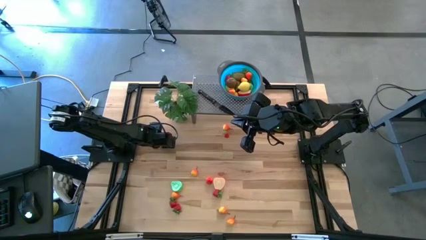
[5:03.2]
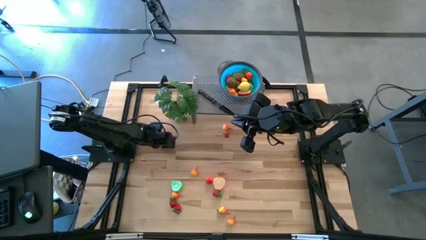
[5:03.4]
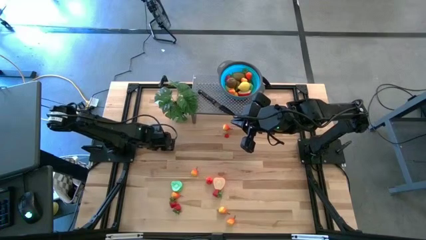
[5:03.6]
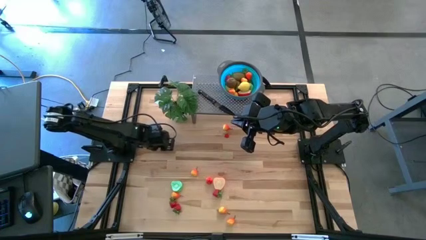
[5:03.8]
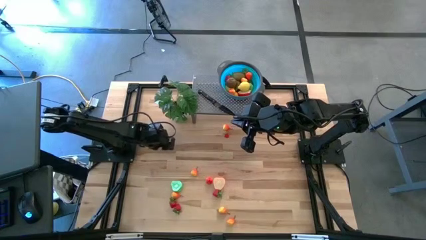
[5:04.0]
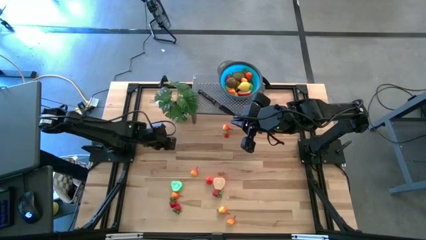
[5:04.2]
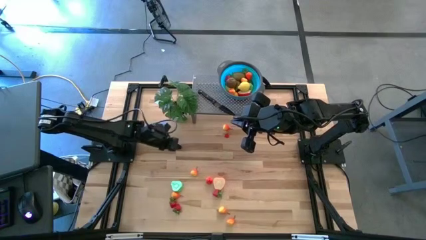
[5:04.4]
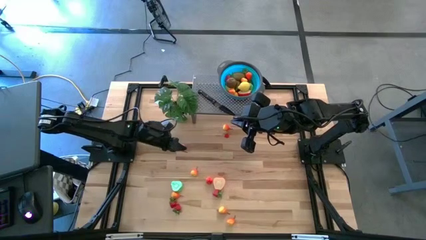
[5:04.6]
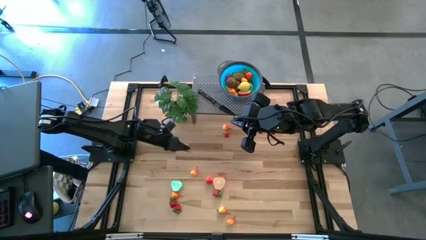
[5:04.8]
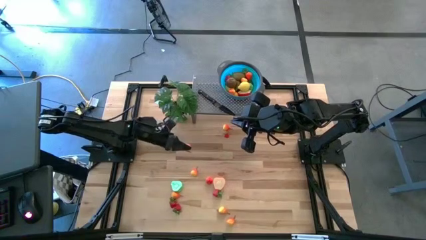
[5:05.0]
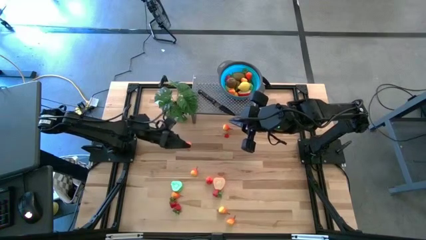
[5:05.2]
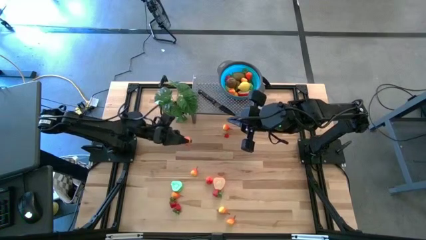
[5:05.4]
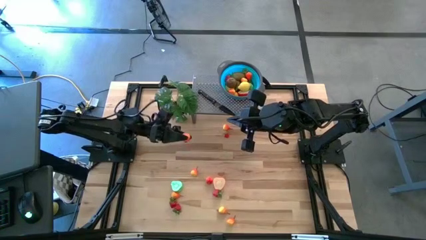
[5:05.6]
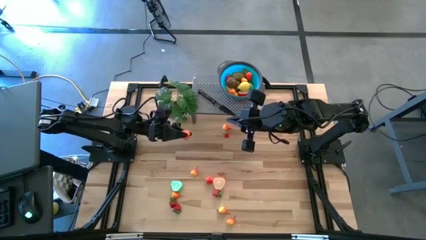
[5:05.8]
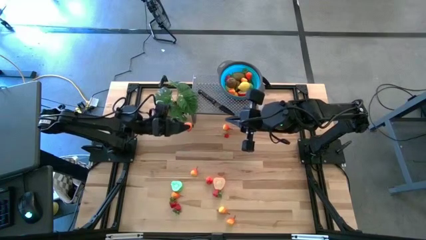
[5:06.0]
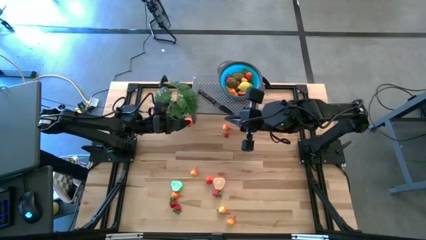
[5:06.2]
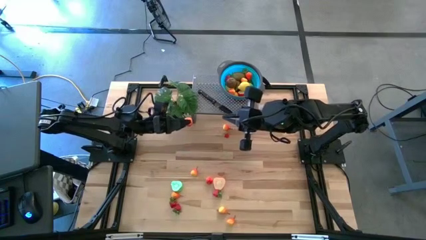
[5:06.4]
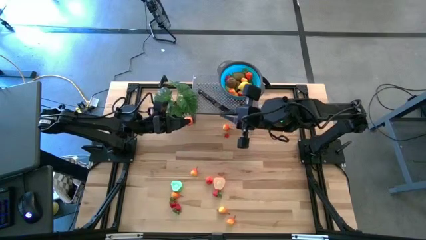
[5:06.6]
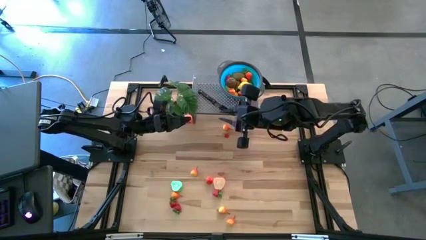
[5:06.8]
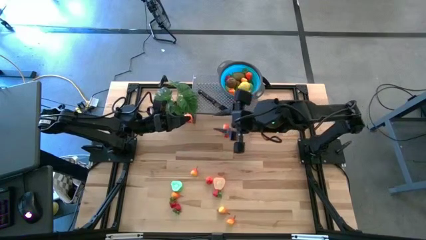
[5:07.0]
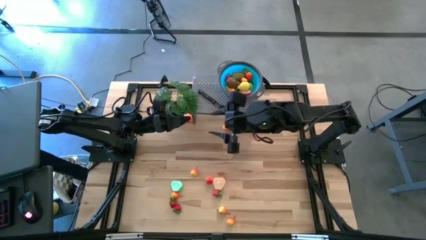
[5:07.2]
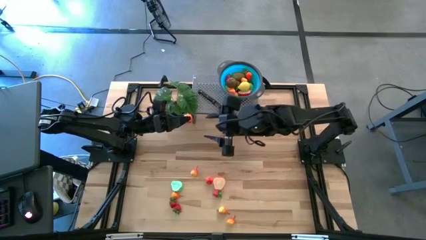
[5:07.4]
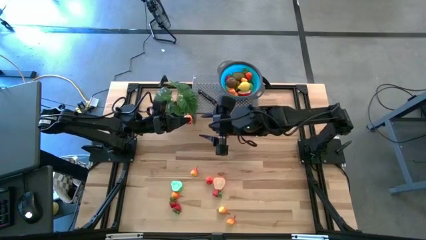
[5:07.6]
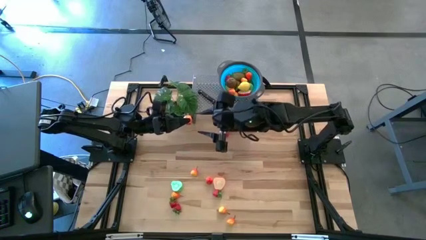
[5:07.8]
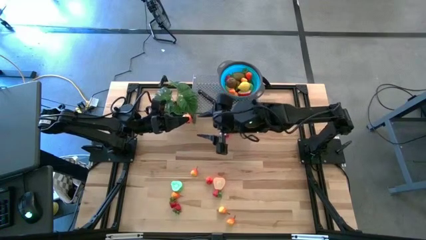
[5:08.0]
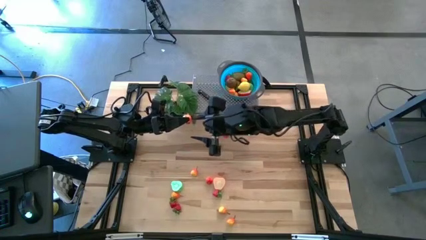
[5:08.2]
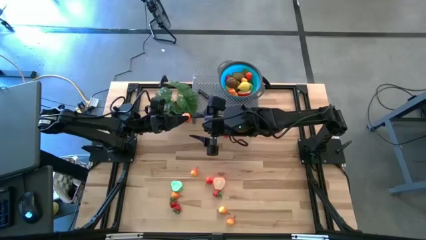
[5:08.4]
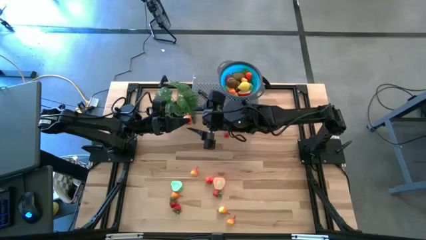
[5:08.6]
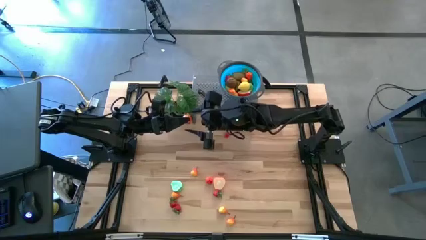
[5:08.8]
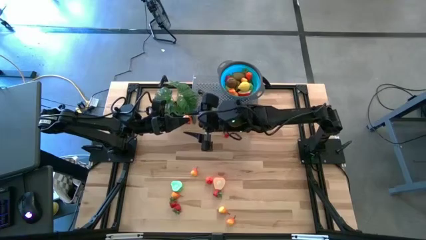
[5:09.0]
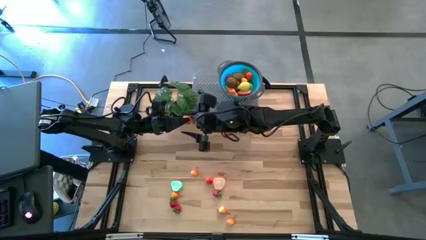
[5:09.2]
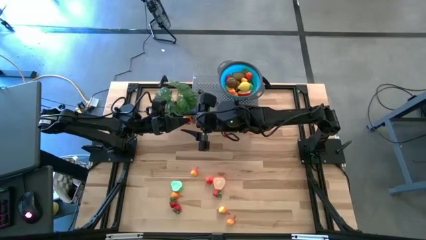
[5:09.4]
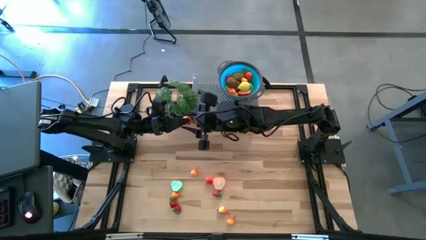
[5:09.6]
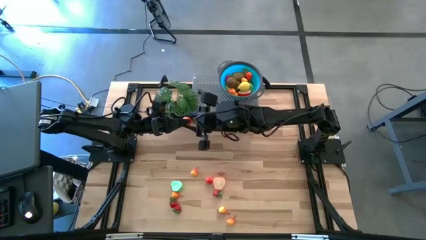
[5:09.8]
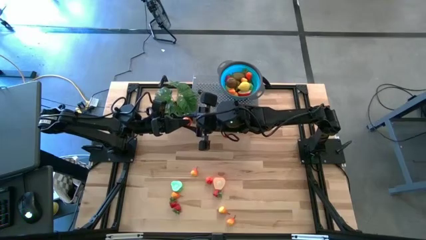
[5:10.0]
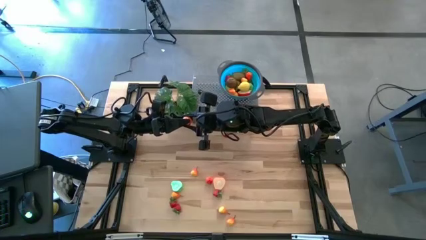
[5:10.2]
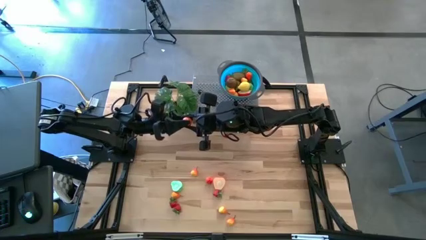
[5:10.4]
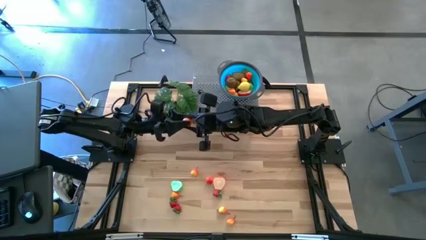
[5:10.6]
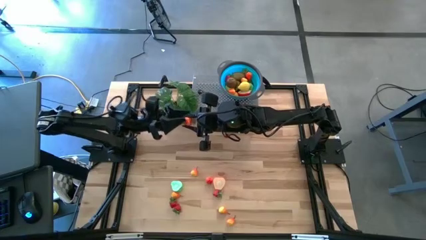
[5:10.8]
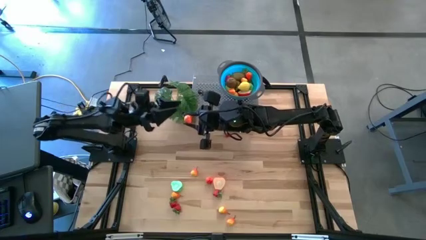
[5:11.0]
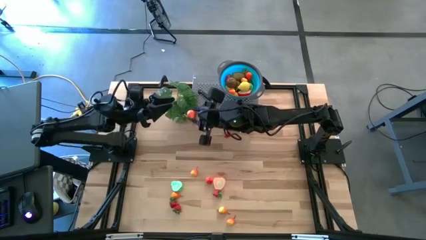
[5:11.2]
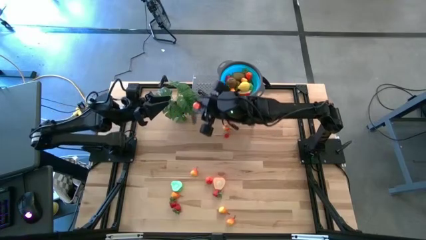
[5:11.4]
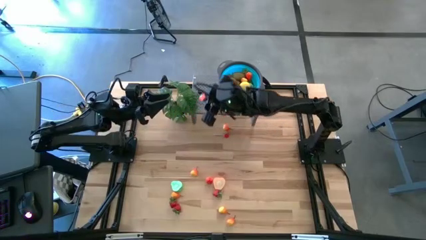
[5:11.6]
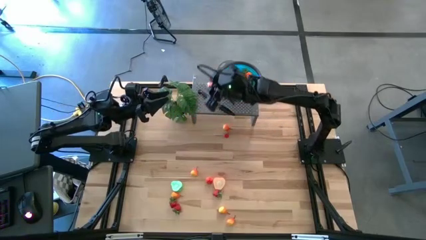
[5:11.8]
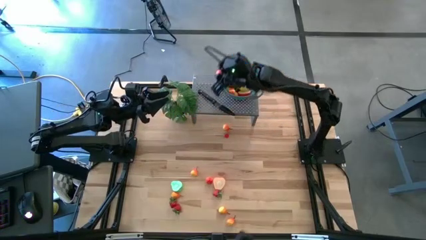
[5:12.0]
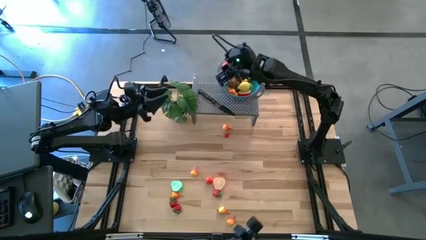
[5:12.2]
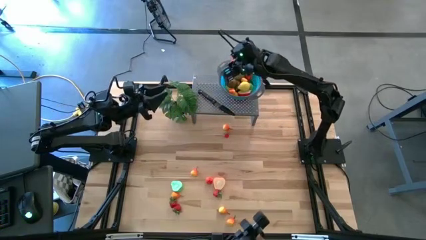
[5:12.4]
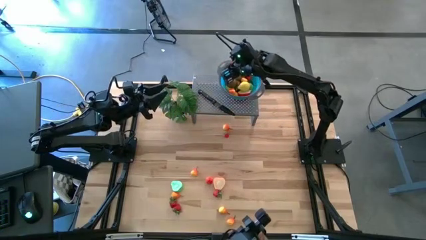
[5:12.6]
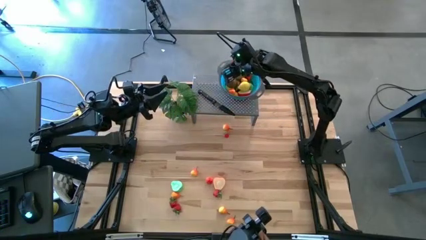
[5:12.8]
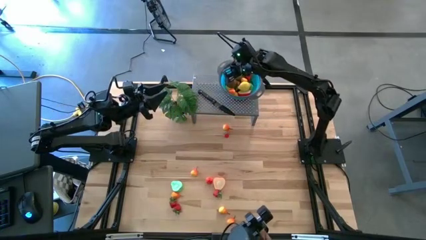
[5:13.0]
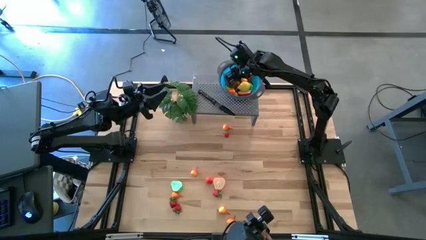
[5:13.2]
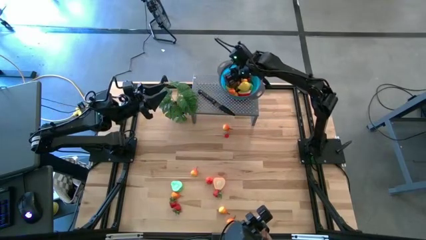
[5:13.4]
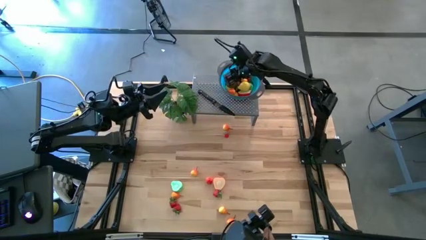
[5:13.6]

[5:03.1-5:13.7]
Task: Pick & Place Fruit
Put the yellow pear in the blue bowl on the shelf

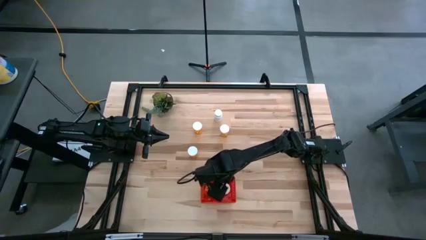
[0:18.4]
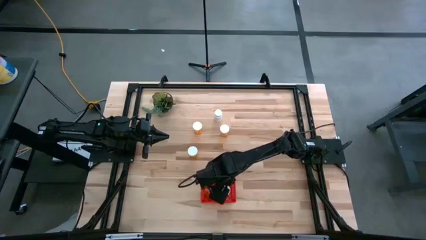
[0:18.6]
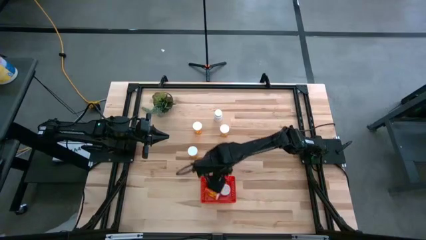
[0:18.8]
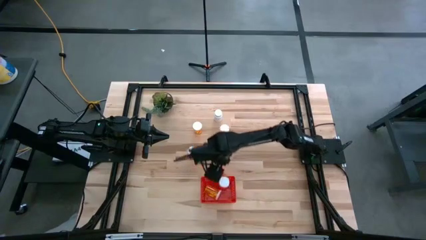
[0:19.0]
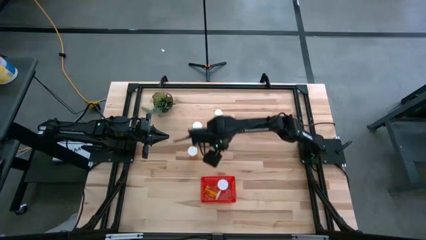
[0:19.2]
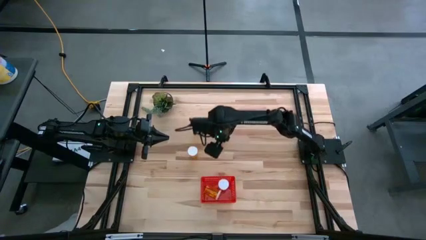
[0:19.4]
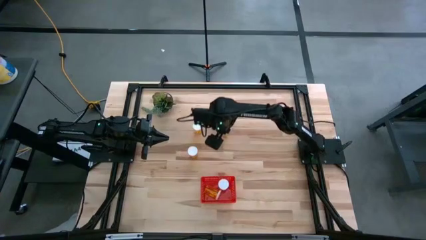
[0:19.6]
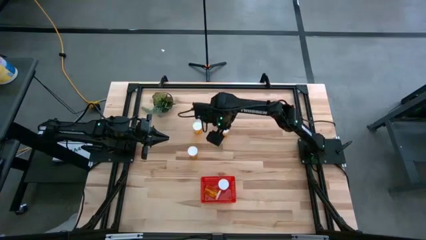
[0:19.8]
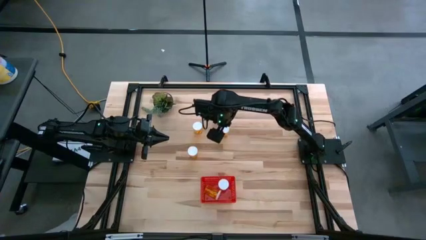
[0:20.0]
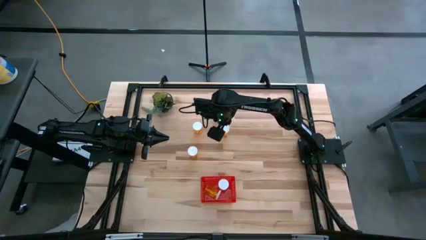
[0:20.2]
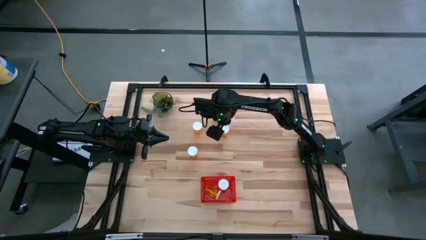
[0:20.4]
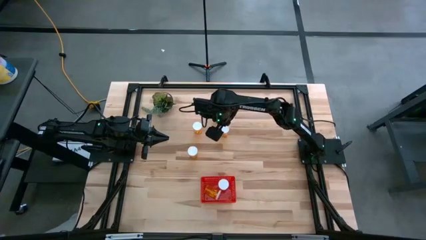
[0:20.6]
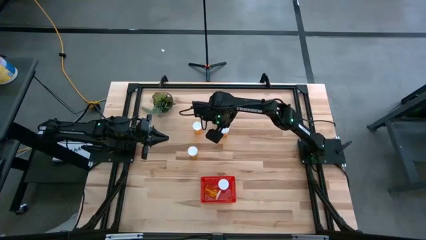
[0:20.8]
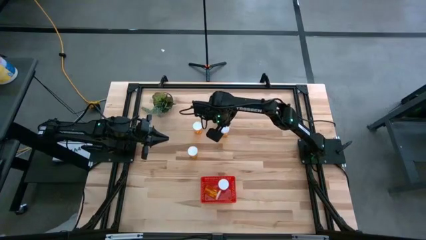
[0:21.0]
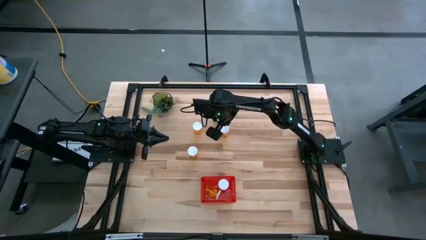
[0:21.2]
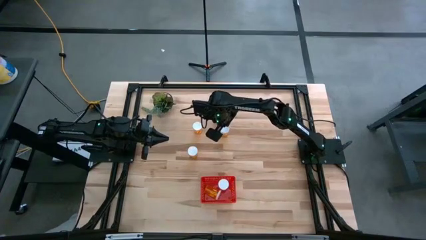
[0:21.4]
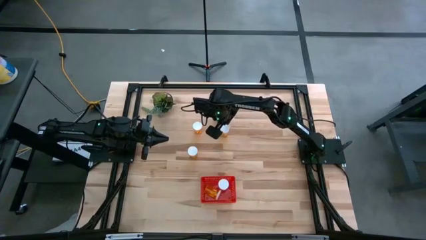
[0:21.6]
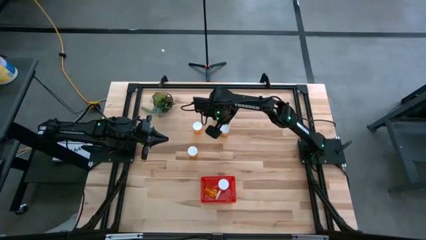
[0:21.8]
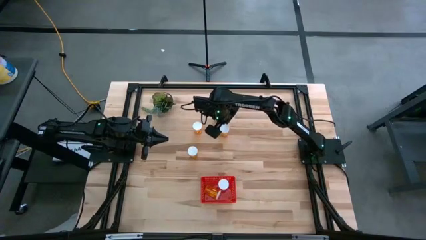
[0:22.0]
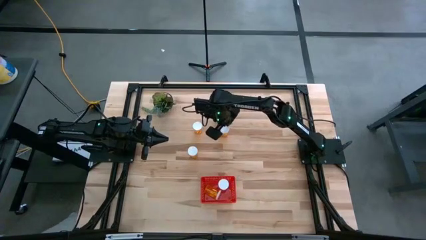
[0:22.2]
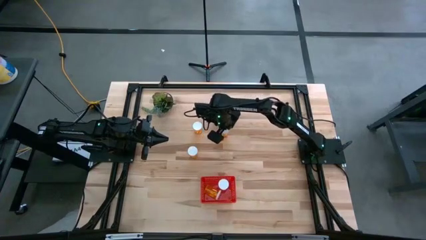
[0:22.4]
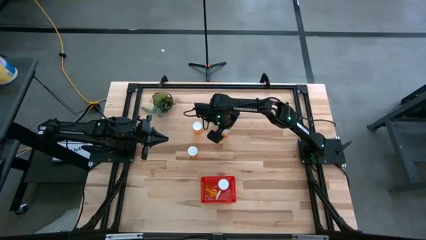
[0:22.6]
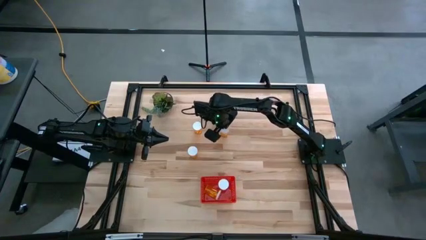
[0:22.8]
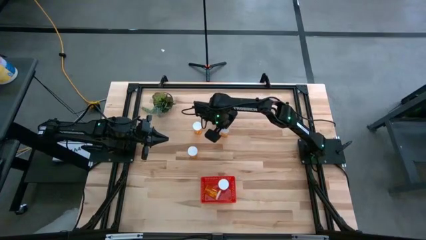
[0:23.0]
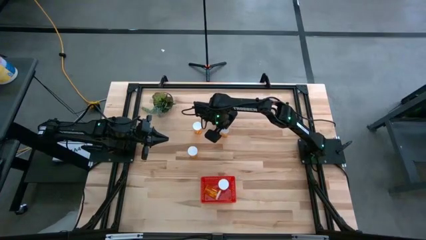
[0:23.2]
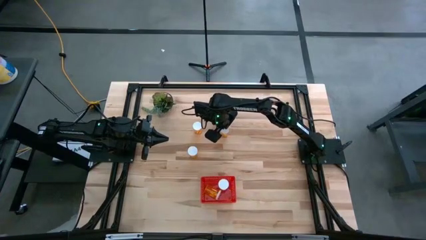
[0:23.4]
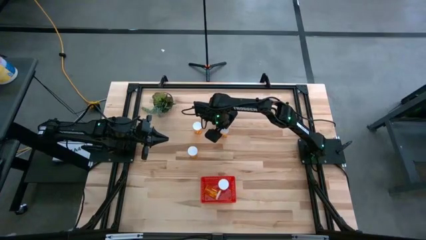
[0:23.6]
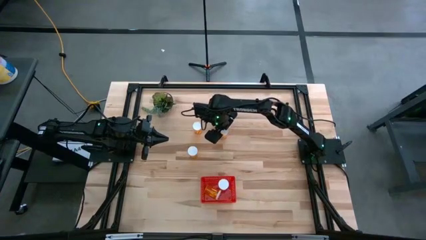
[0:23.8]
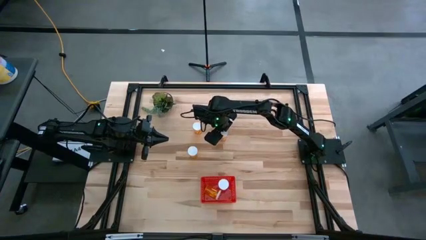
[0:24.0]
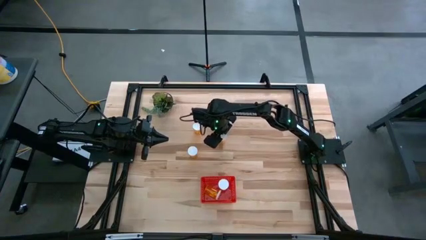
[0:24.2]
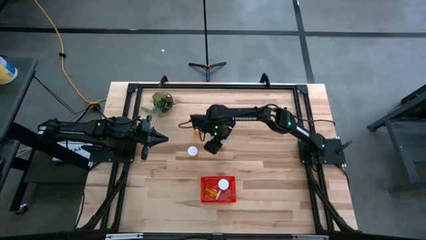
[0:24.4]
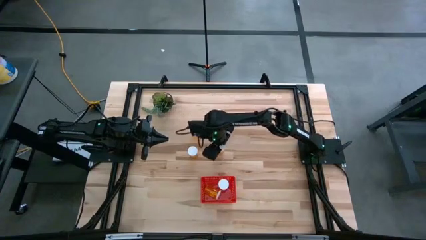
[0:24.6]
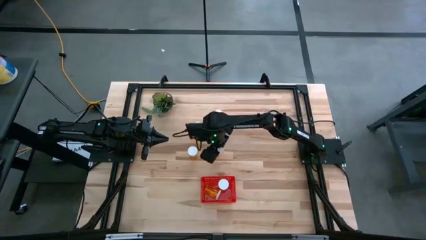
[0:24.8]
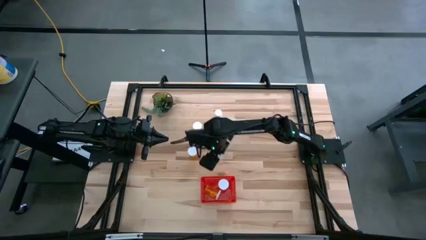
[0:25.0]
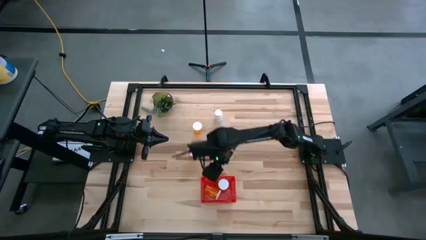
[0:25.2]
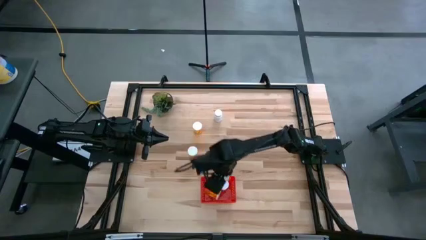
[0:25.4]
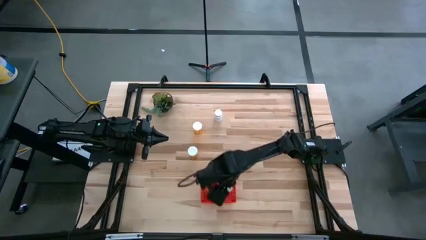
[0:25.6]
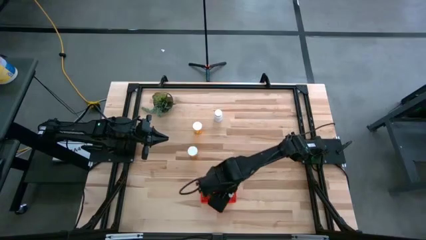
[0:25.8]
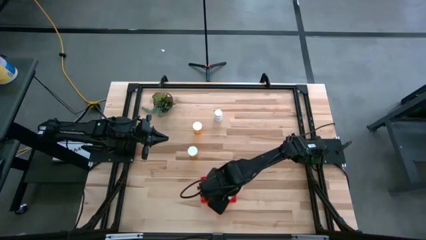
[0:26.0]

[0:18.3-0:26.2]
Task: Pick and place pill bottles into a basket
Put the orange pill bottle into the red bin
